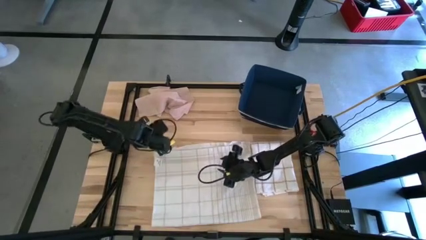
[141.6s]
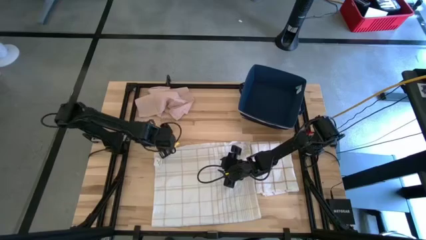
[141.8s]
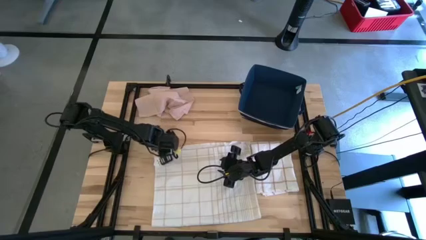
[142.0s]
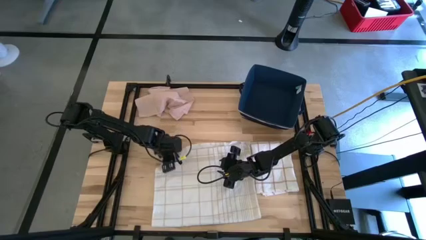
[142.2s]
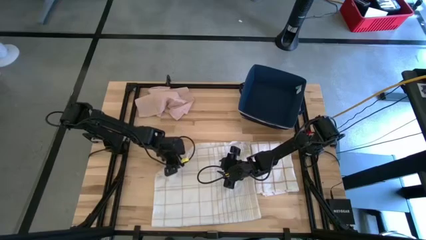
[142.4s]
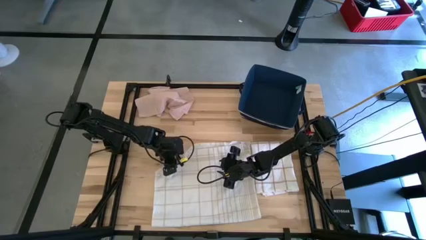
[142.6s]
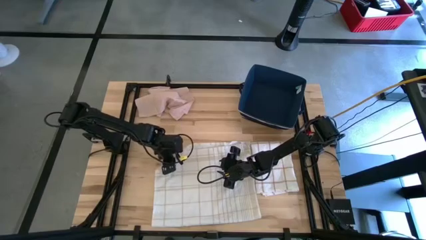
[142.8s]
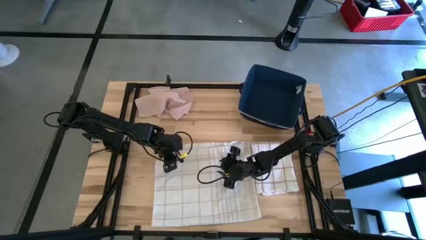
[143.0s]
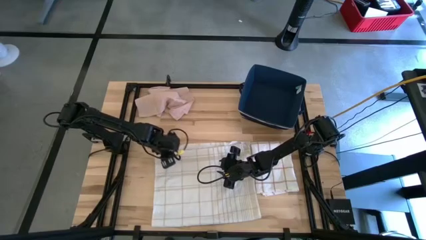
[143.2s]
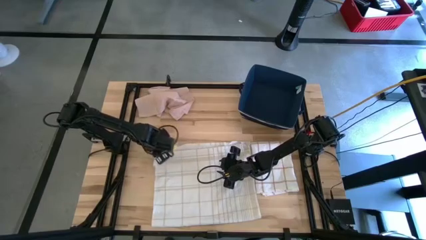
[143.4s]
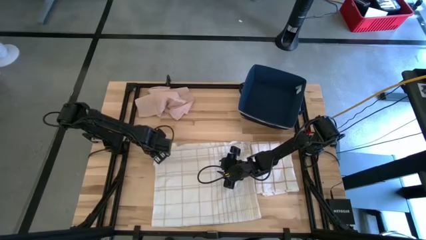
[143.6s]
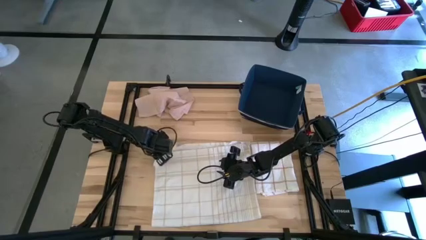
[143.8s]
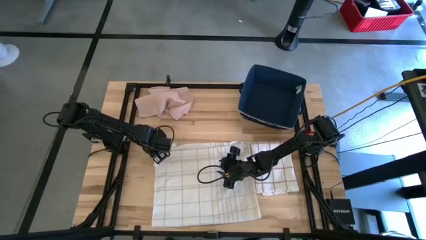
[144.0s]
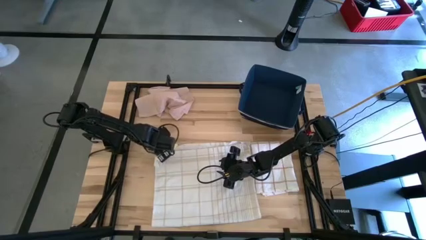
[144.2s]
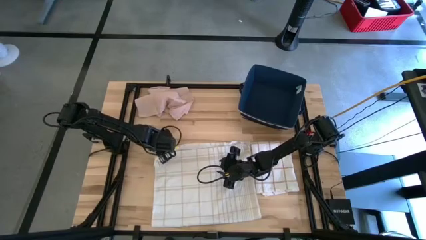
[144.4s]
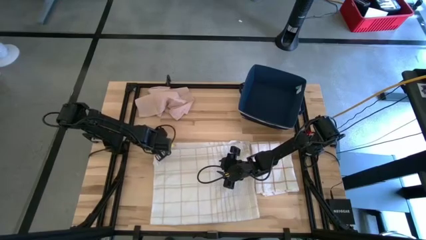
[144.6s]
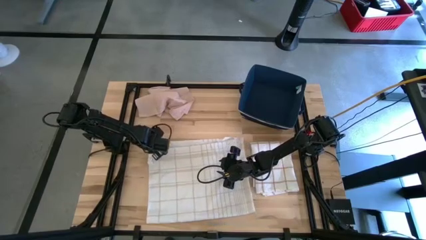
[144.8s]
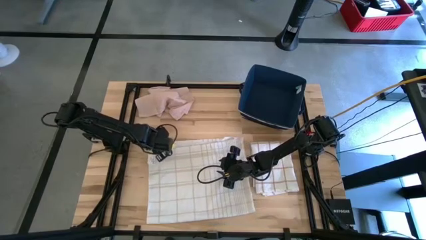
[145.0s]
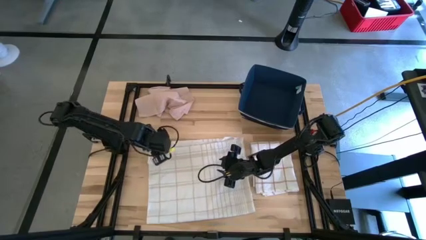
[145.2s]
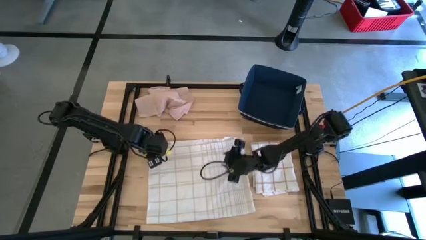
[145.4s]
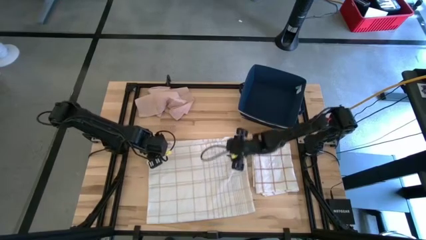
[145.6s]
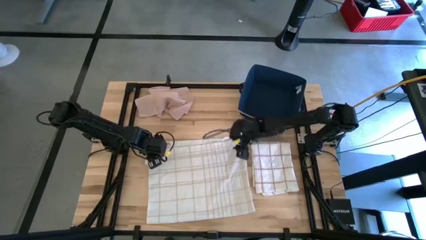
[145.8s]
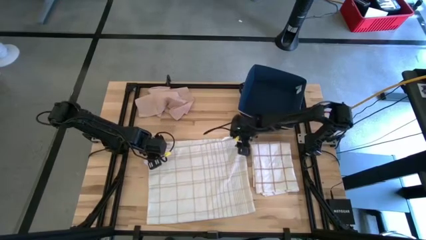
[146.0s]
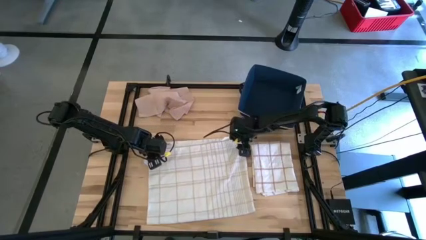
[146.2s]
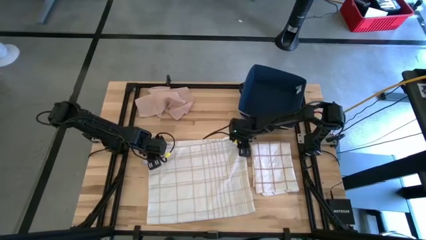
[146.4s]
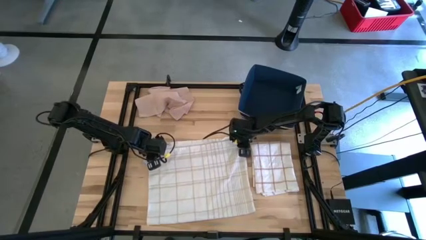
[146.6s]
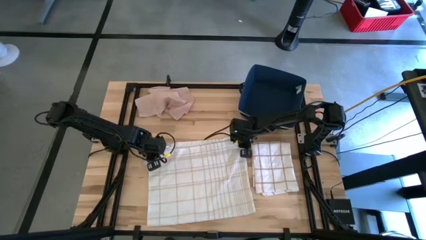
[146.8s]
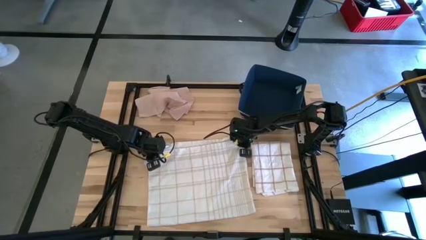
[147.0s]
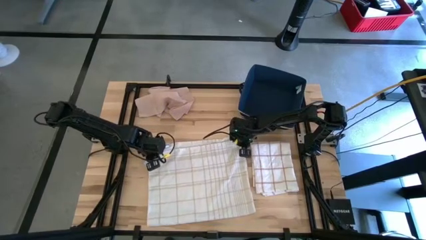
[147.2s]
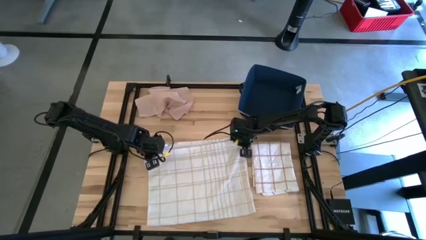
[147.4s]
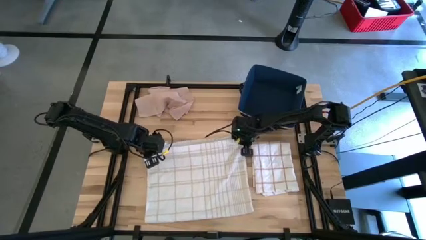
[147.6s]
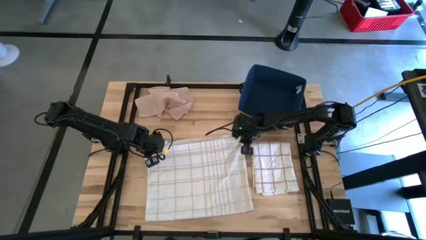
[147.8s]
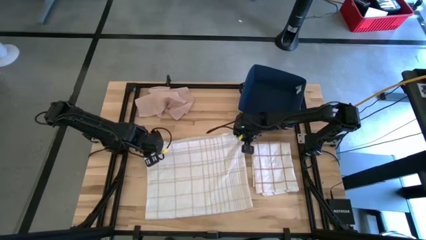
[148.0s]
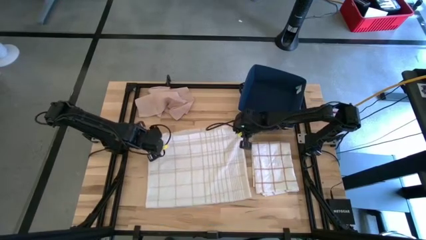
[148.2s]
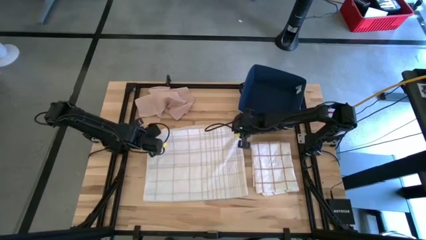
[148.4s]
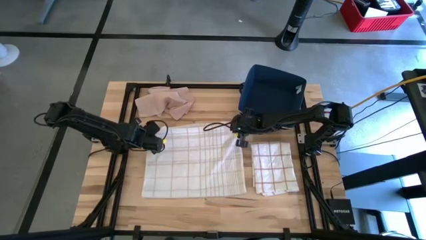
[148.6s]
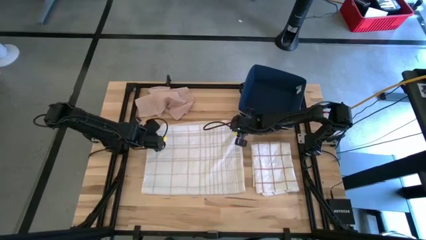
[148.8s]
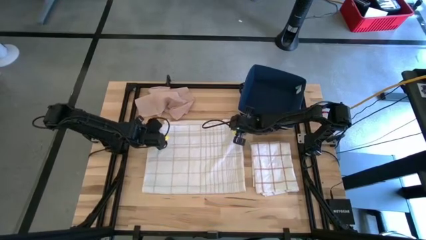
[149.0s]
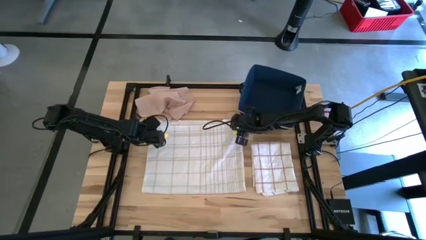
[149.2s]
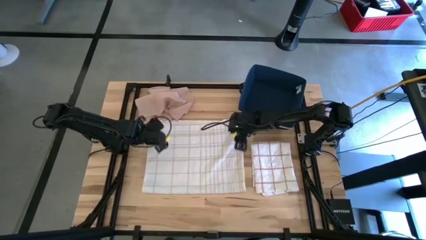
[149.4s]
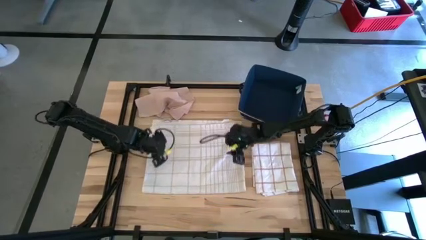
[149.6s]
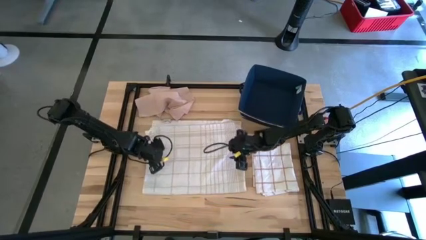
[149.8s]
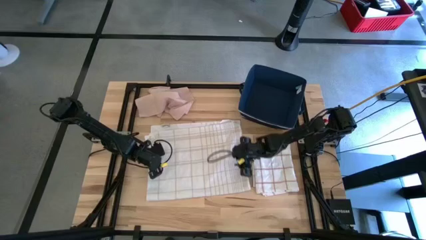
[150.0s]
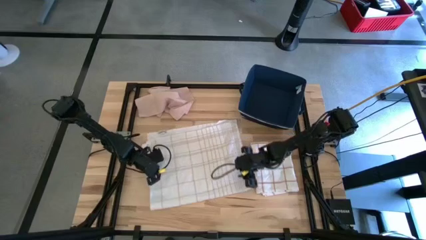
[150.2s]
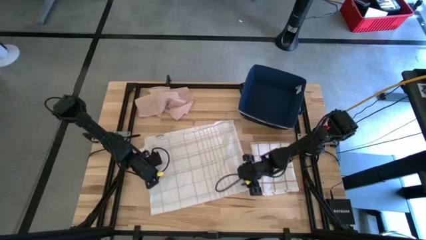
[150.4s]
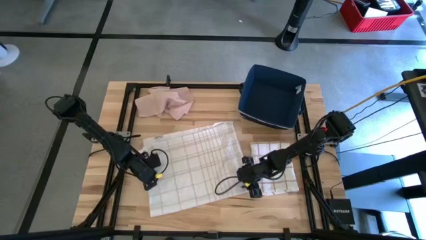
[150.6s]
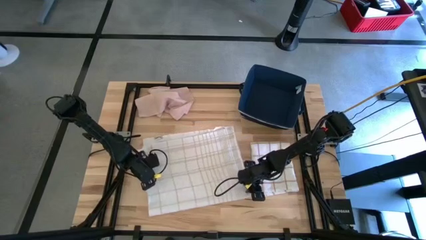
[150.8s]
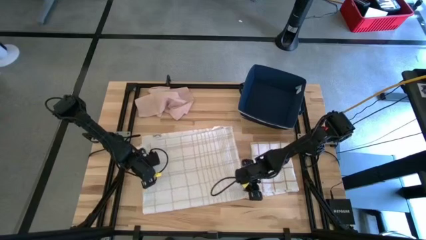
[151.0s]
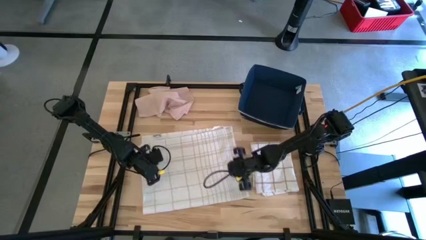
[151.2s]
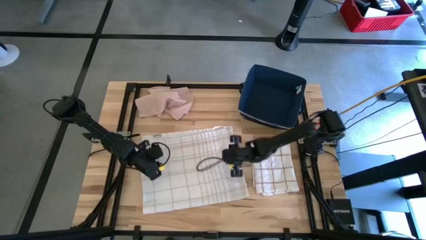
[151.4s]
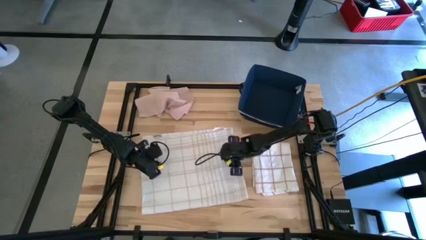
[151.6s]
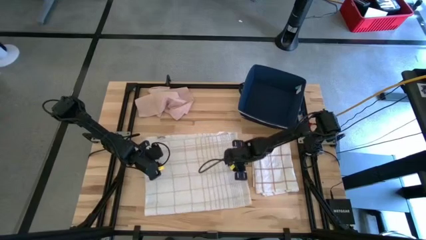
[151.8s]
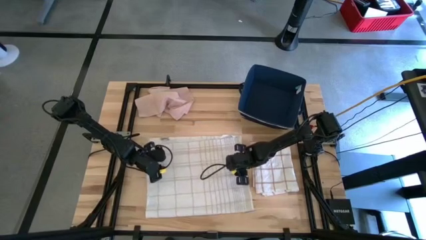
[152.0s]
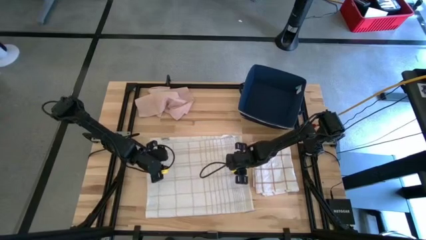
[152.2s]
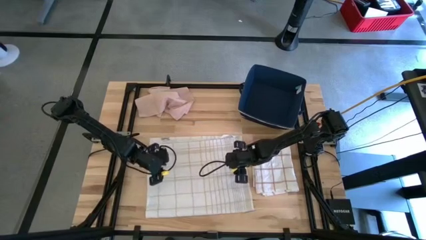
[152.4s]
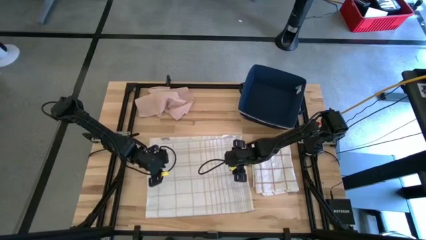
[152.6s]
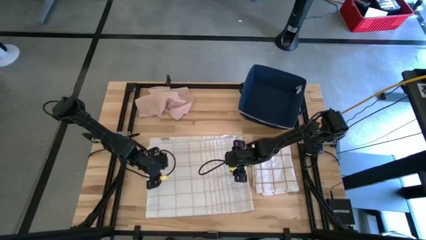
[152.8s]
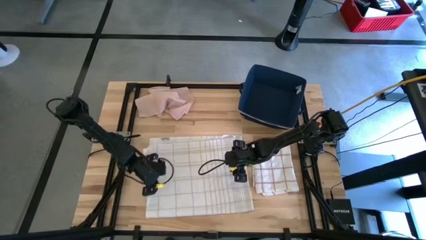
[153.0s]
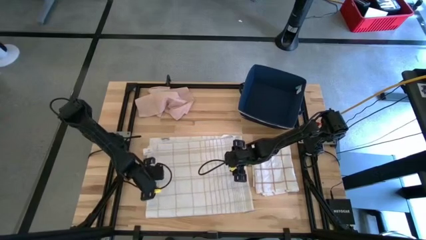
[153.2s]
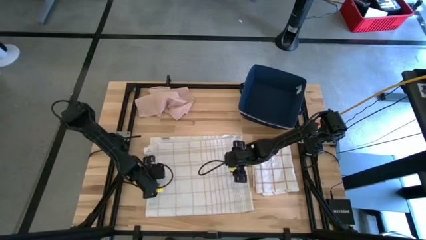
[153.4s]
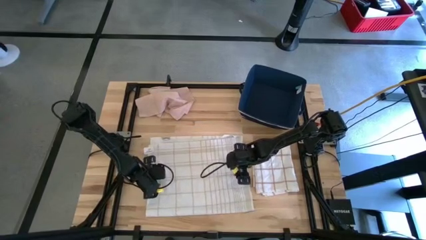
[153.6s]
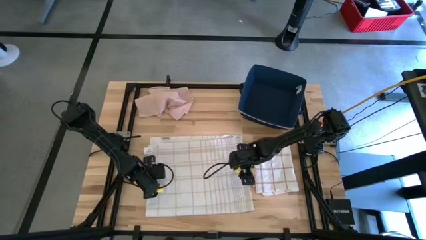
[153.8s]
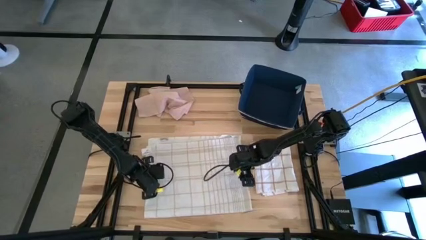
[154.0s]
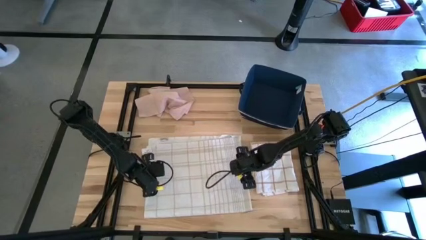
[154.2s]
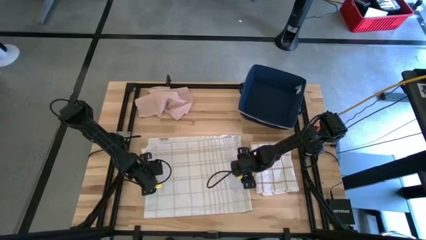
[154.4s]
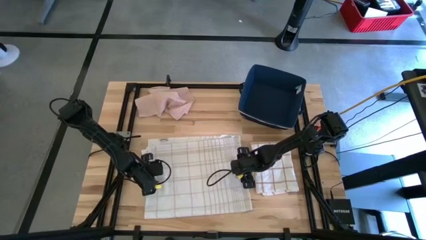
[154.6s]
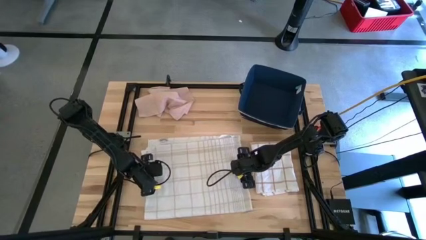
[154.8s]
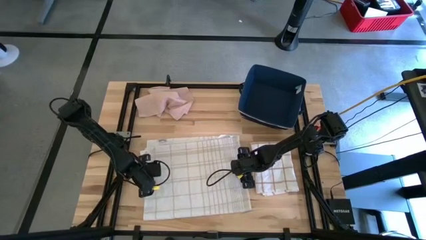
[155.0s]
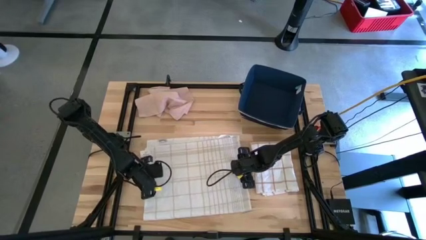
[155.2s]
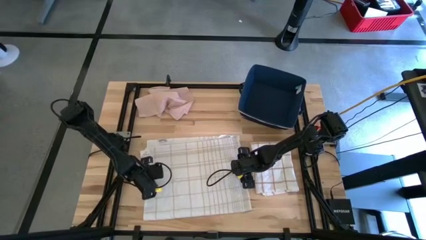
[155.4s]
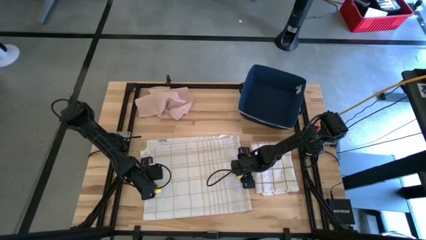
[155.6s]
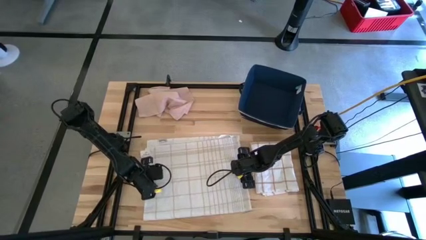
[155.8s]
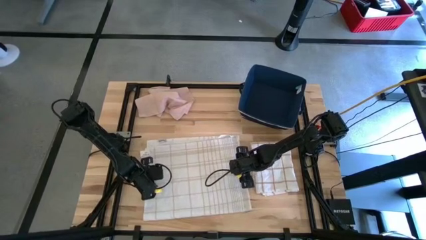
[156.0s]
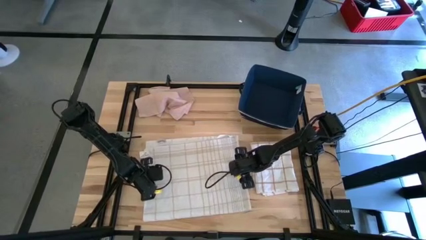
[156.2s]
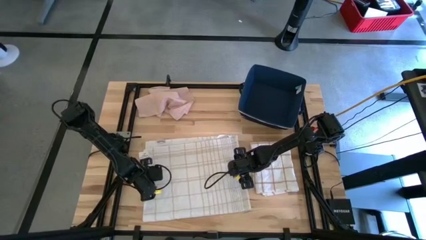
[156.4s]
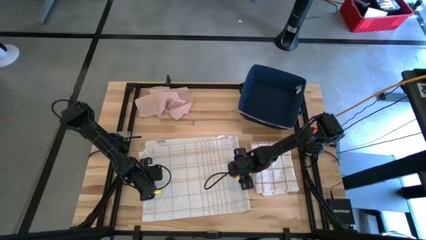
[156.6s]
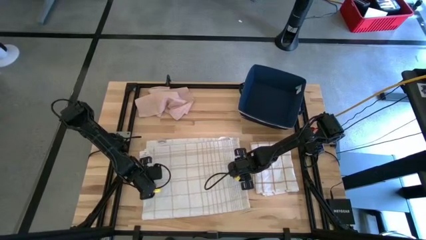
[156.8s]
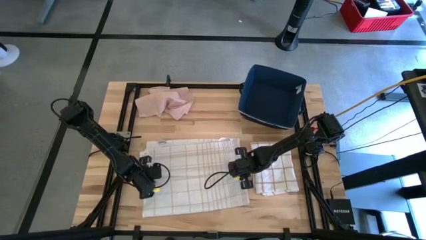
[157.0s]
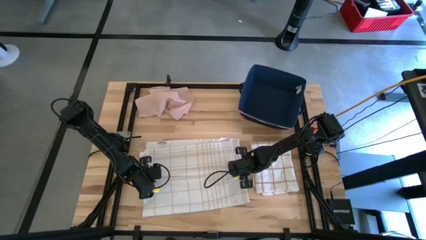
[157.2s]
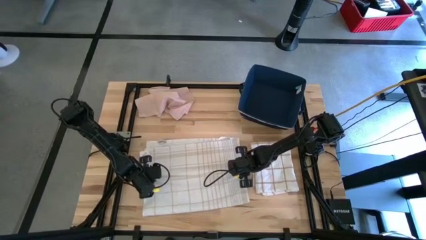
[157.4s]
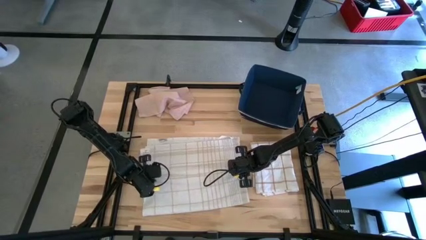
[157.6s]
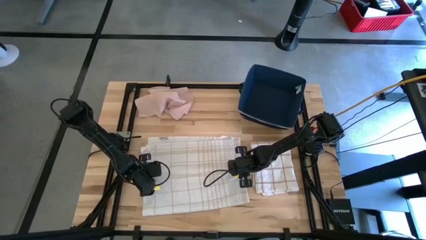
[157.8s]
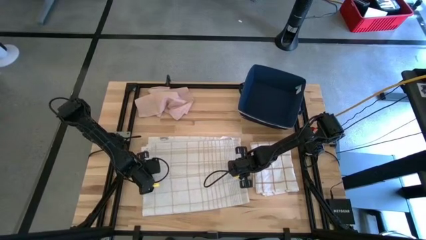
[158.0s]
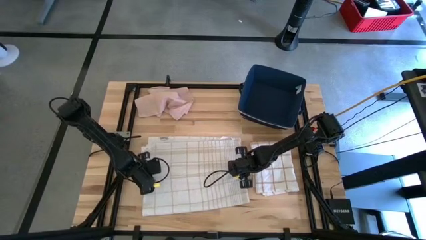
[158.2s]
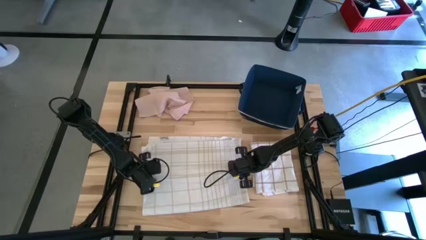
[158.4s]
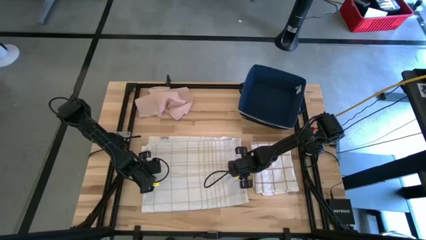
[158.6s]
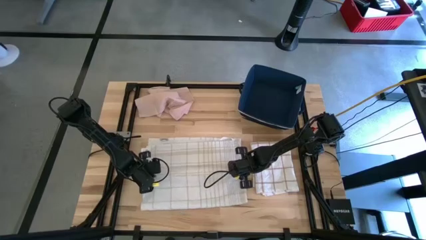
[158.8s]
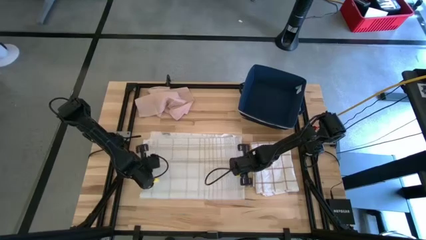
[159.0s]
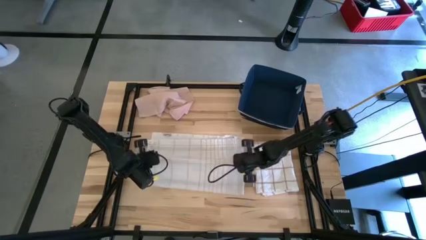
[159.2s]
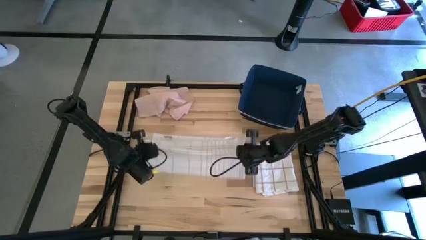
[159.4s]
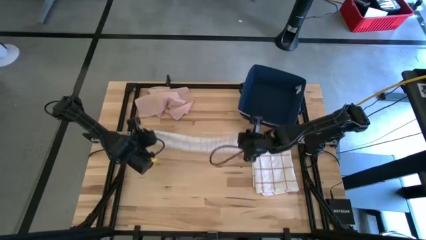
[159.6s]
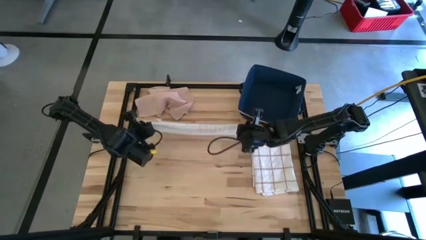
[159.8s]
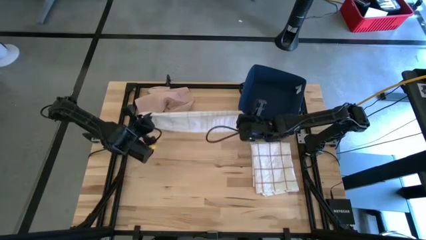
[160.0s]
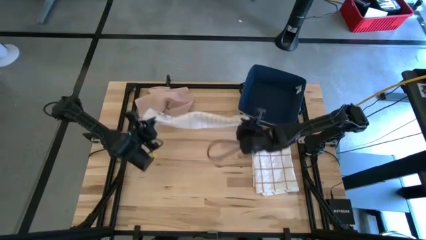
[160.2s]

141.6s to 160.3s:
Task: Fold towel
Fold the white with grey-stripe towel
